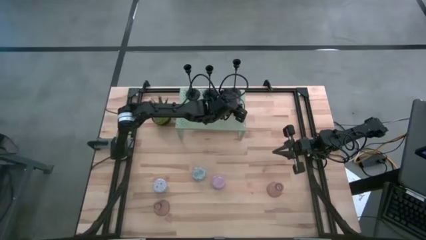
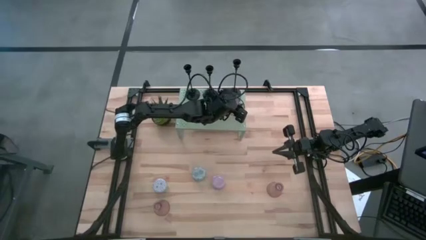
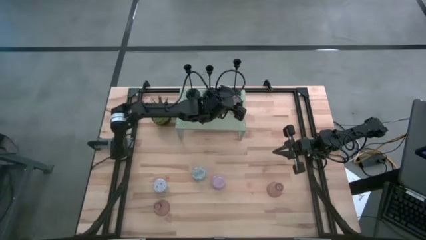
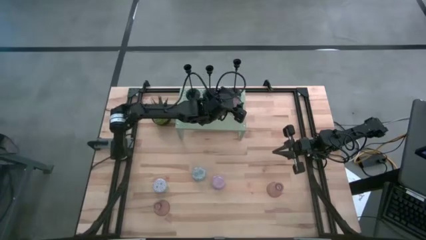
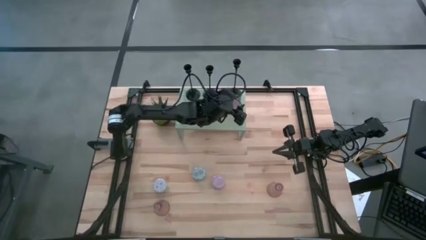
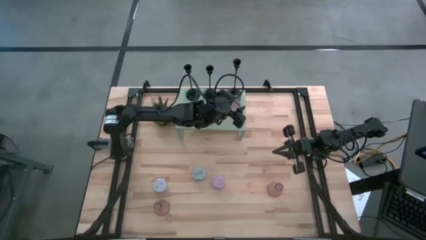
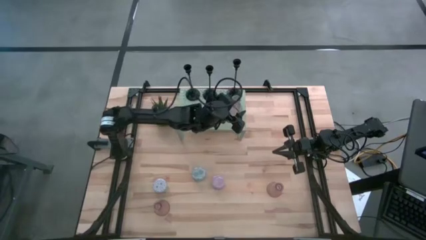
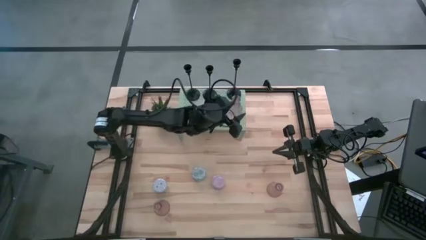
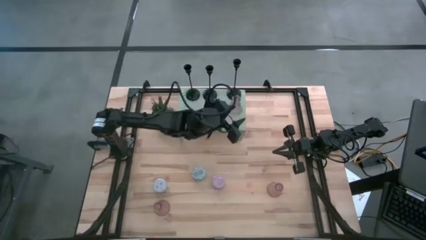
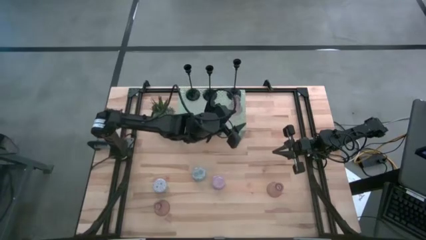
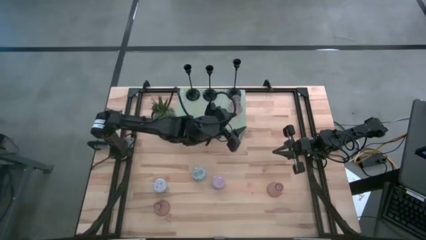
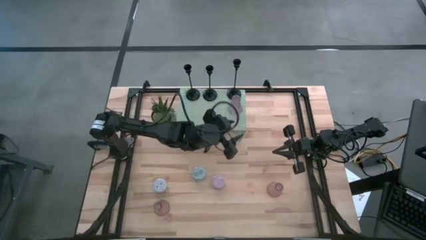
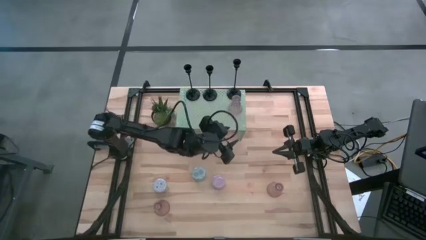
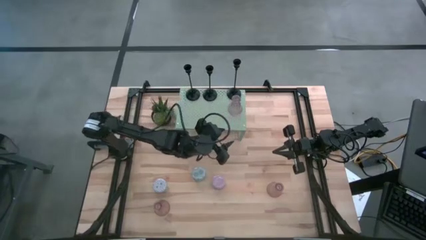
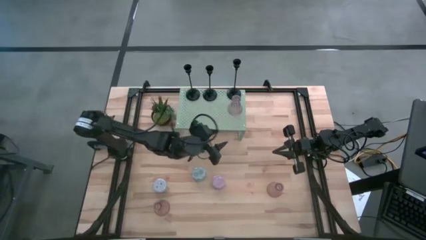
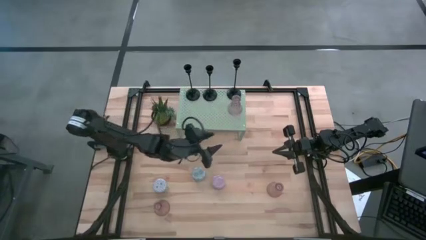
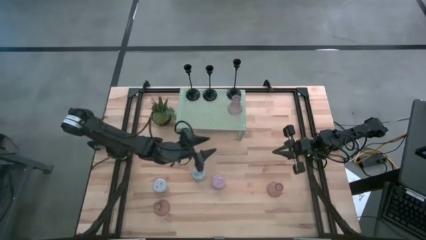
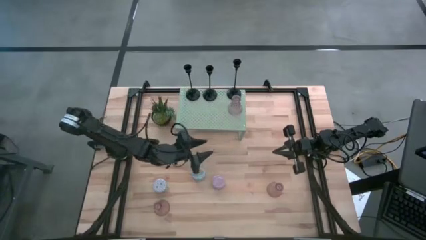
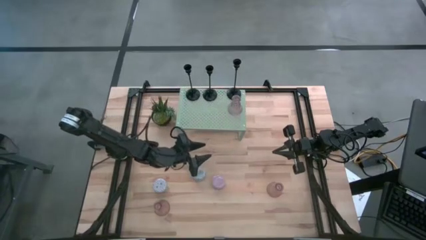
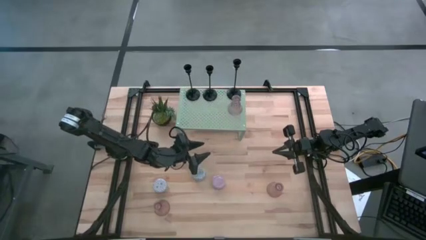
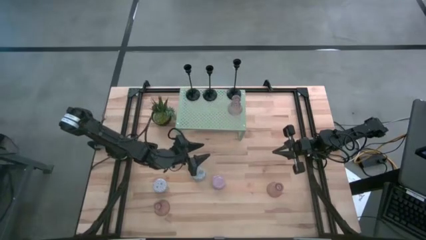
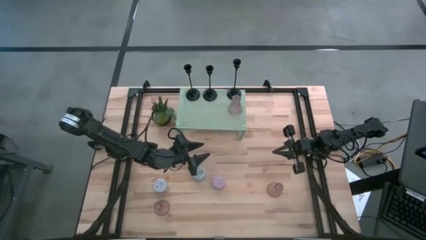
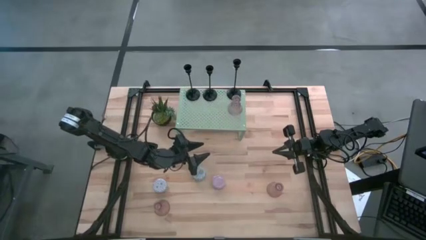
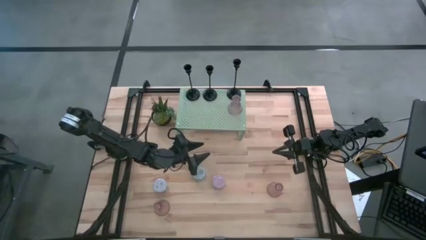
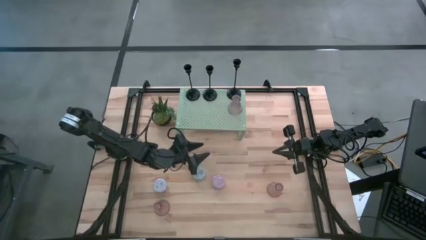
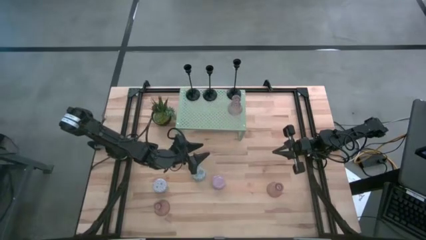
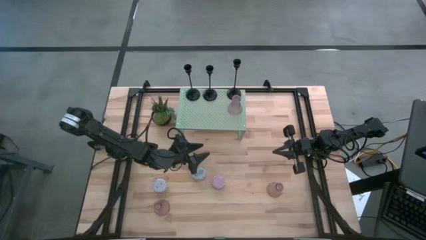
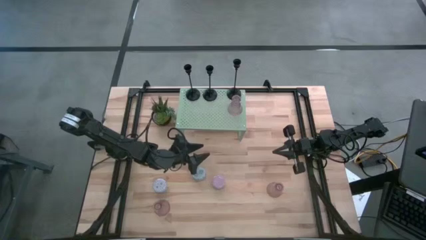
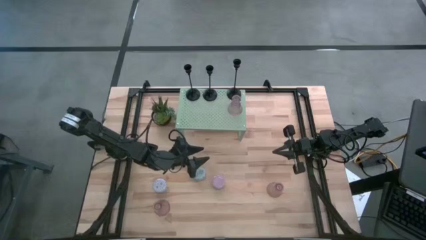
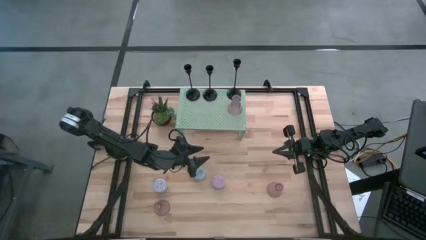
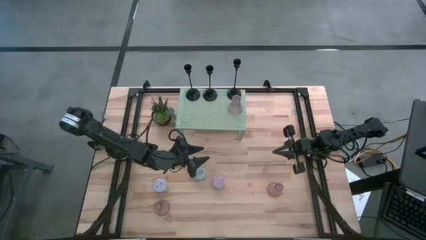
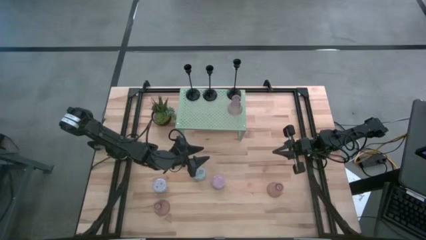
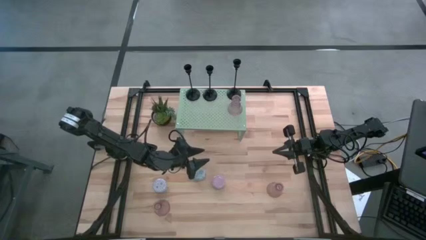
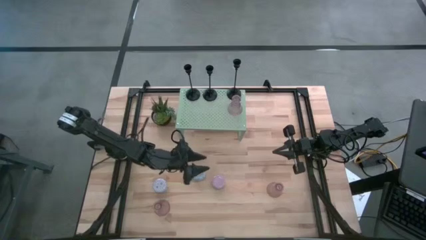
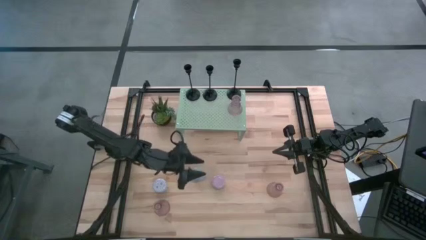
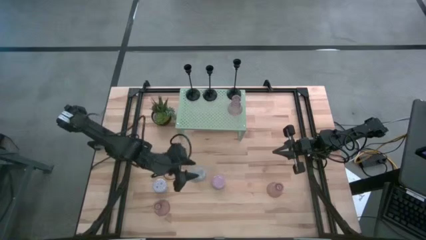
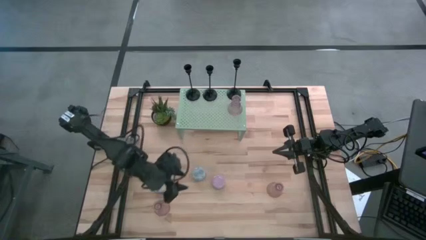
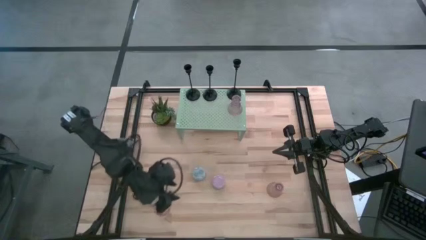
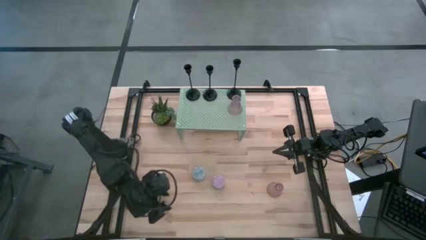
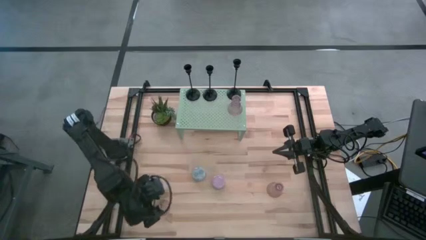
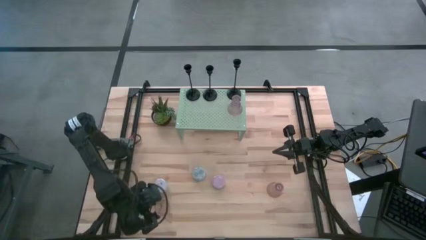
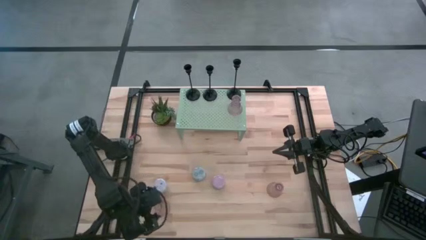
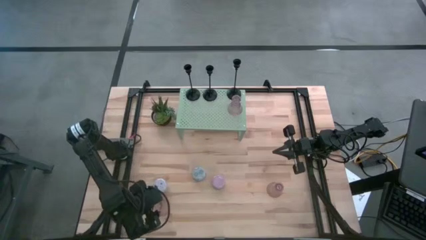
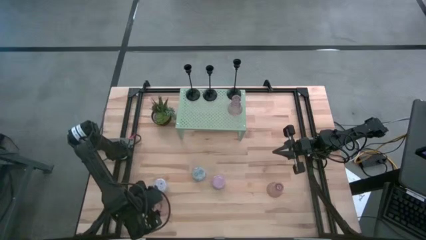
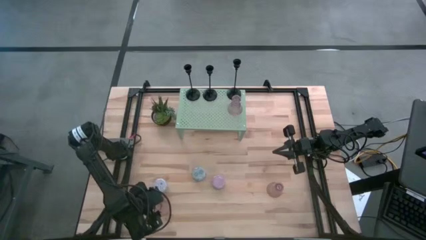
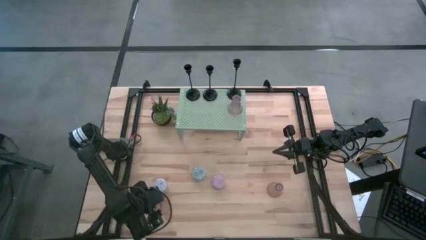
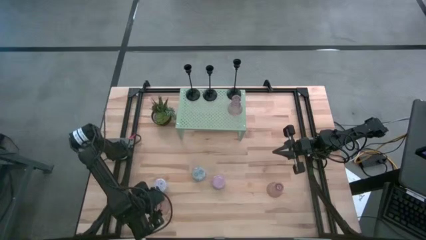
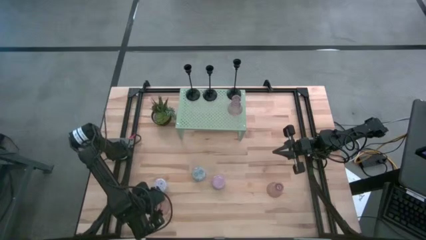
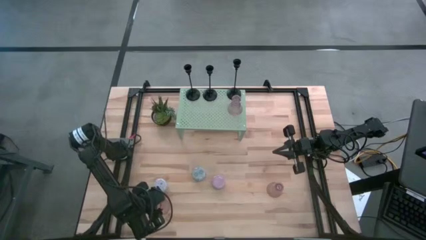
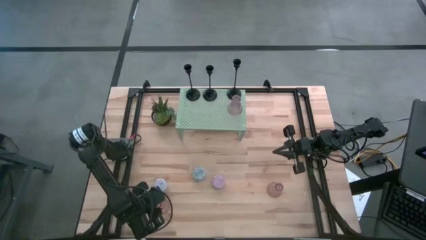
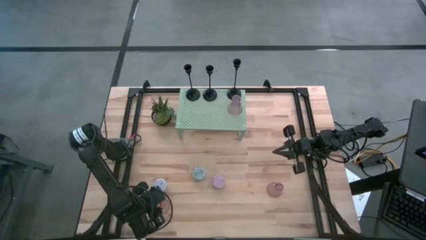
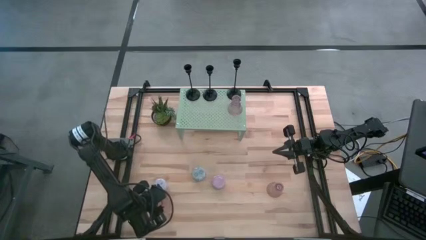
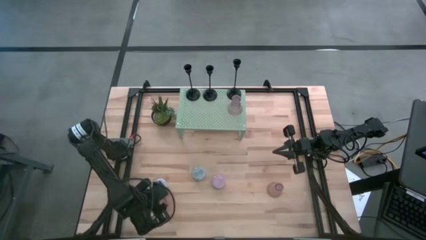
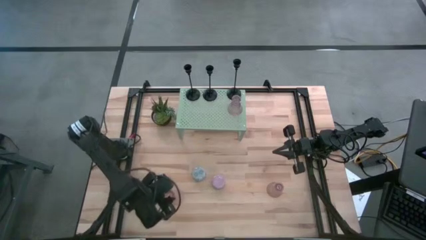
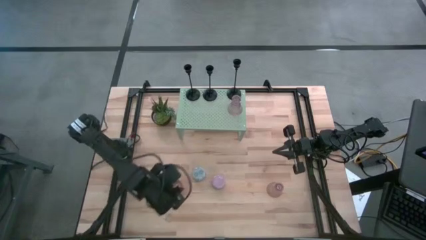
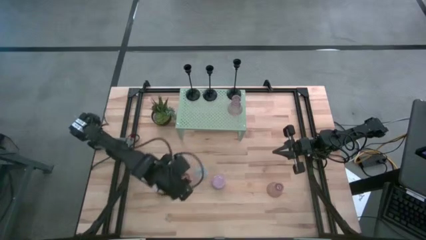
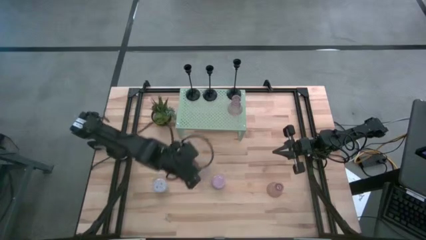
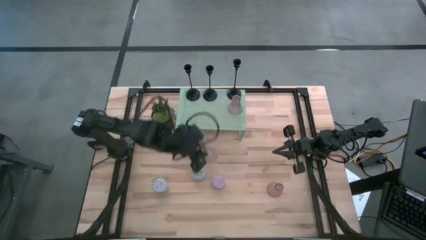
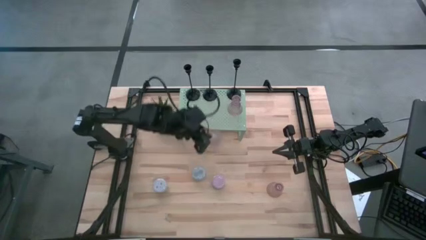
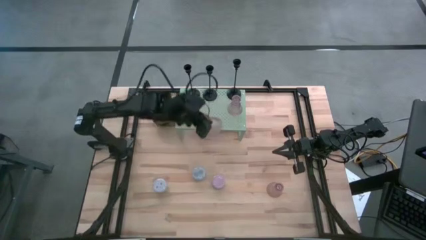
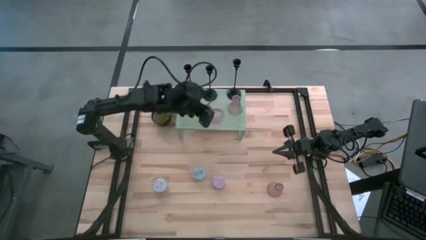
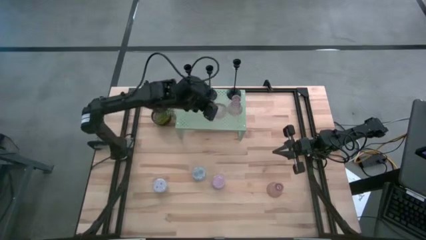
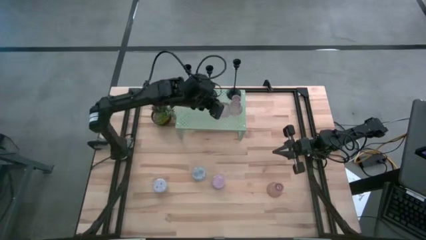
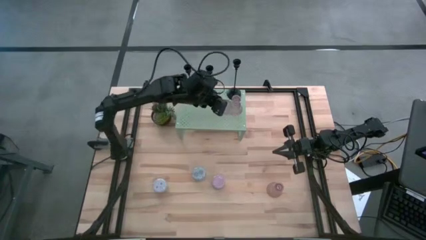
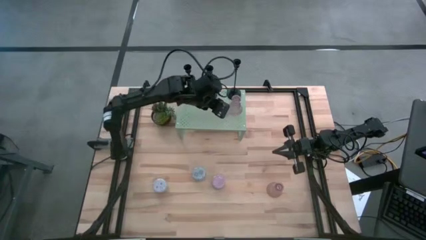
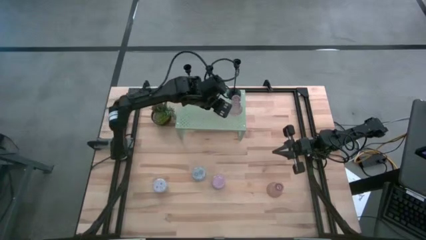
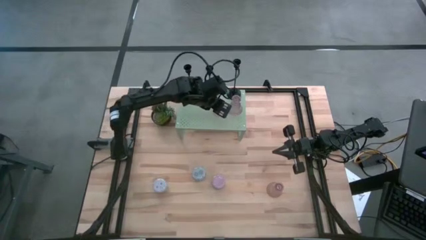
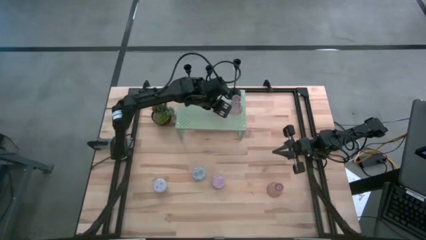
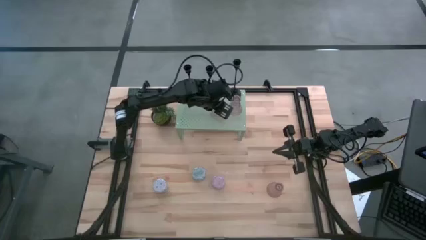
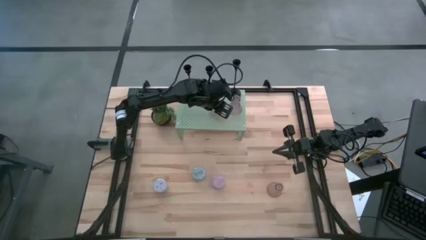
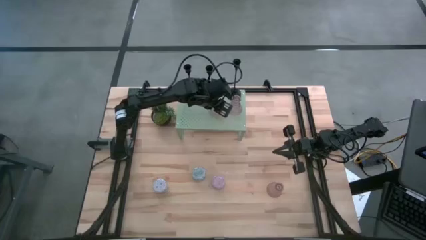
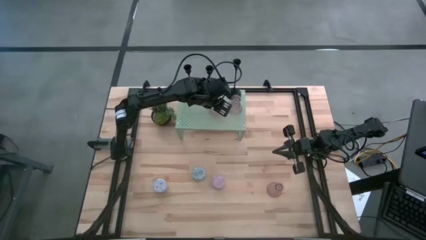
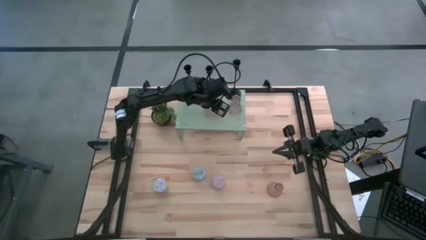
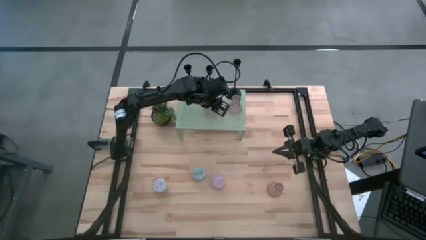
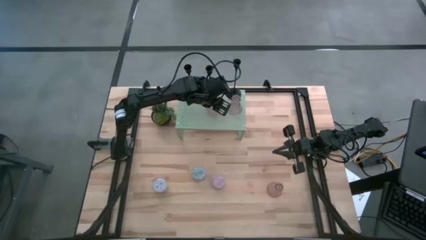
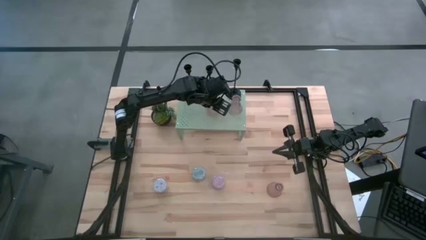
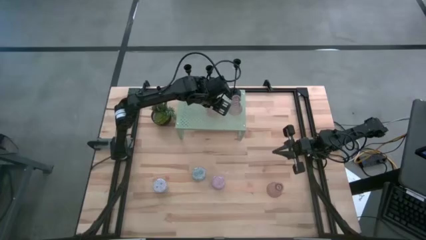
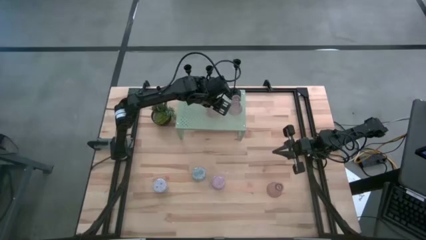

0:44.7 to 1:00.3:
Task: Pick & Place candle stick holders
Put the left transparent pink candle holder on the shelf aligned with the black candle holder
